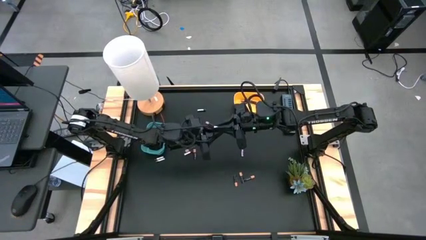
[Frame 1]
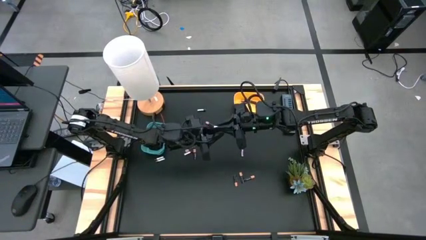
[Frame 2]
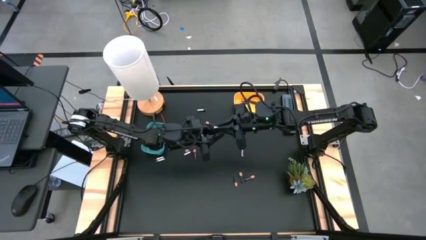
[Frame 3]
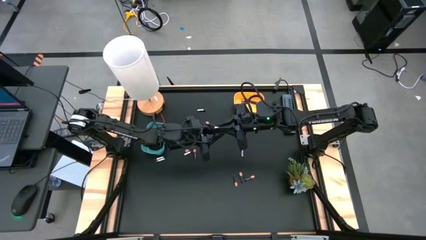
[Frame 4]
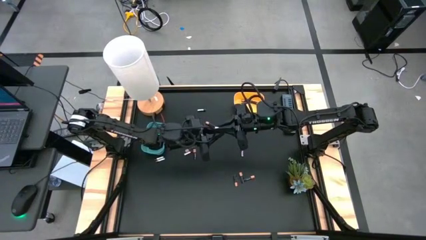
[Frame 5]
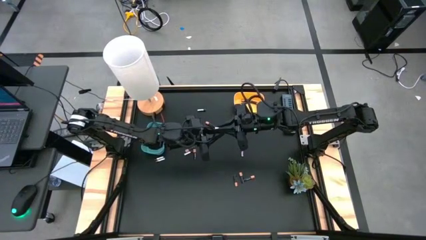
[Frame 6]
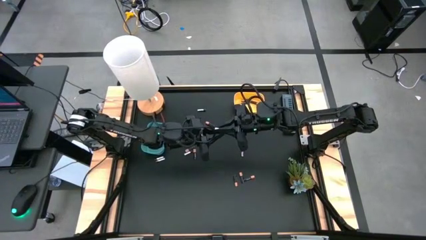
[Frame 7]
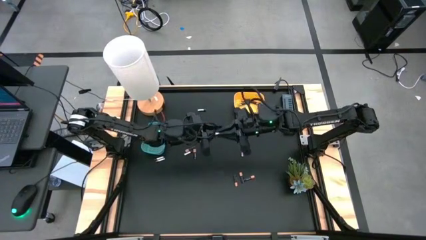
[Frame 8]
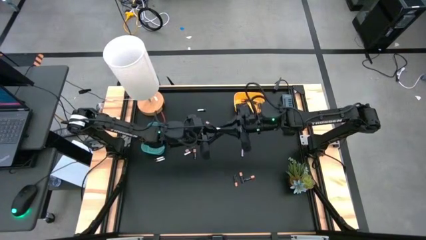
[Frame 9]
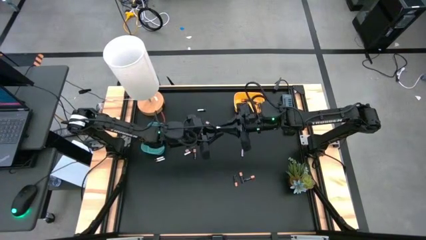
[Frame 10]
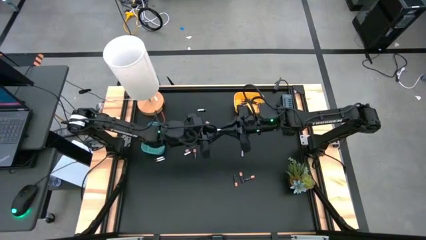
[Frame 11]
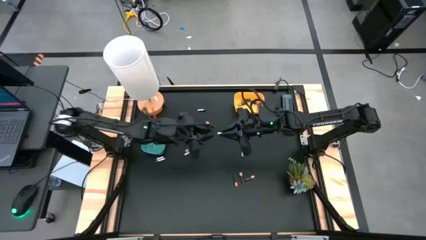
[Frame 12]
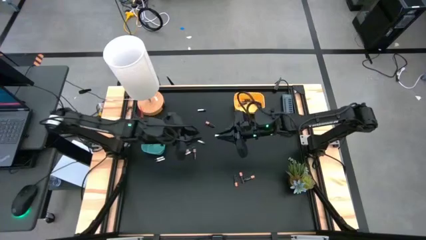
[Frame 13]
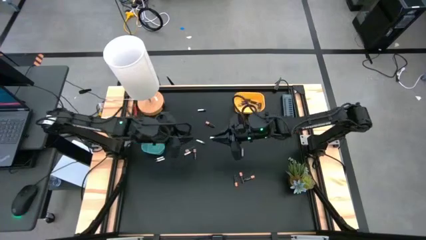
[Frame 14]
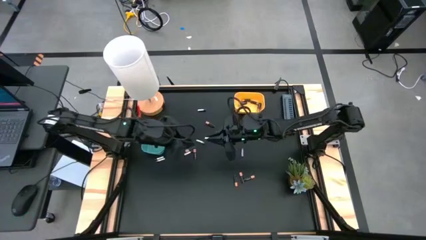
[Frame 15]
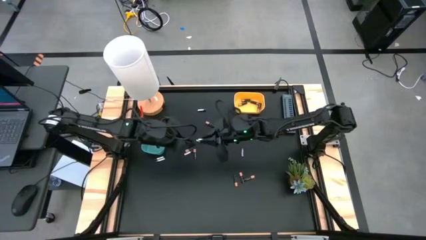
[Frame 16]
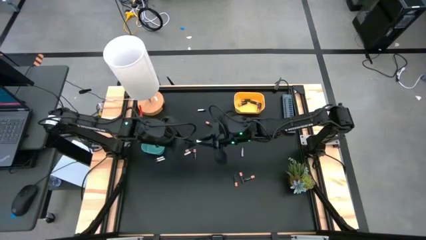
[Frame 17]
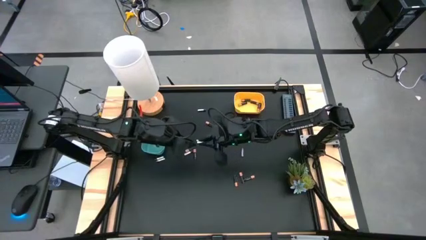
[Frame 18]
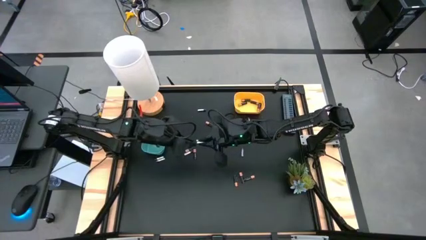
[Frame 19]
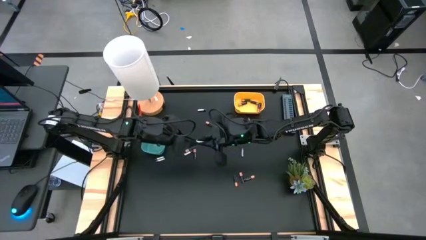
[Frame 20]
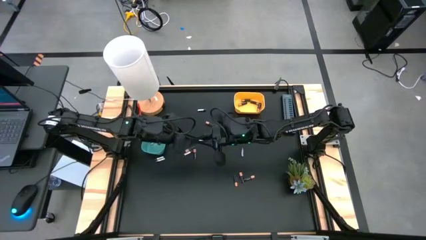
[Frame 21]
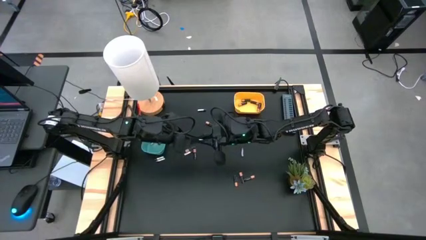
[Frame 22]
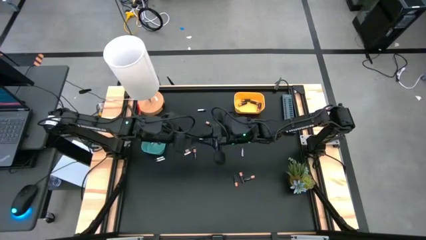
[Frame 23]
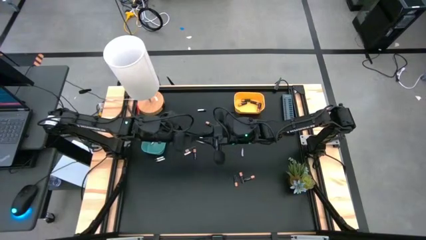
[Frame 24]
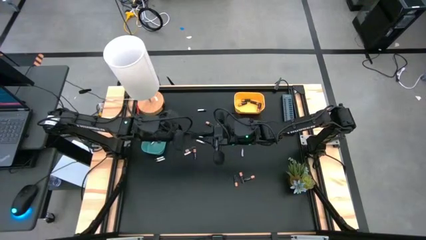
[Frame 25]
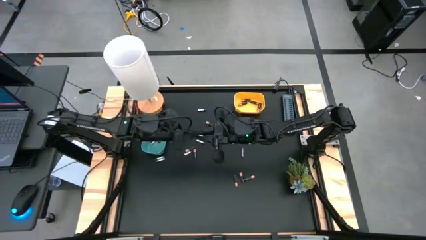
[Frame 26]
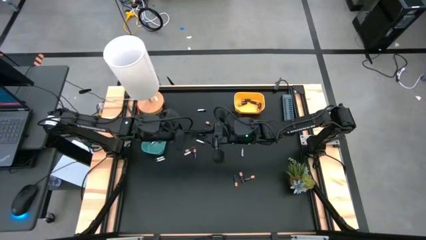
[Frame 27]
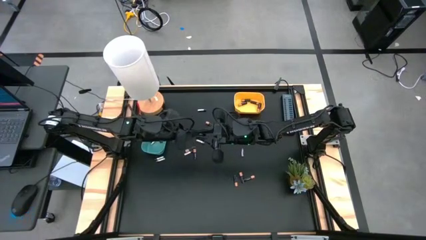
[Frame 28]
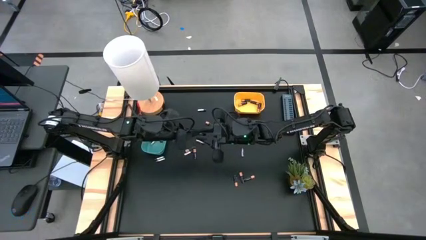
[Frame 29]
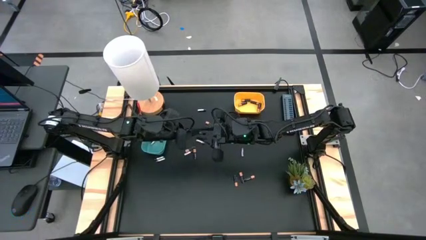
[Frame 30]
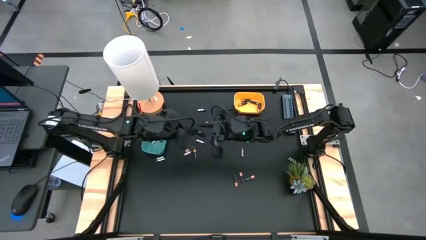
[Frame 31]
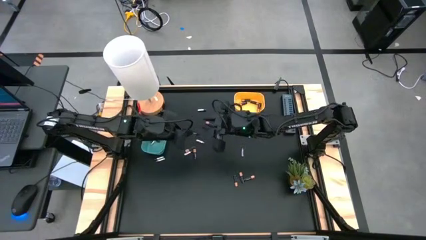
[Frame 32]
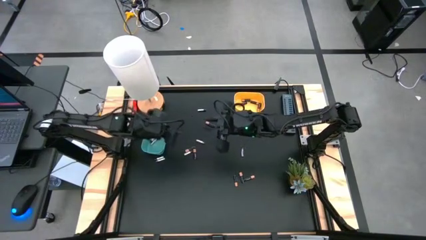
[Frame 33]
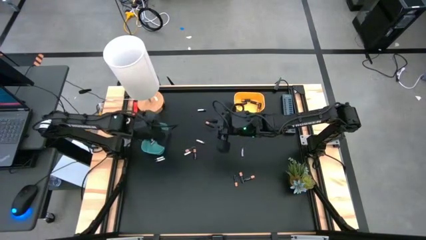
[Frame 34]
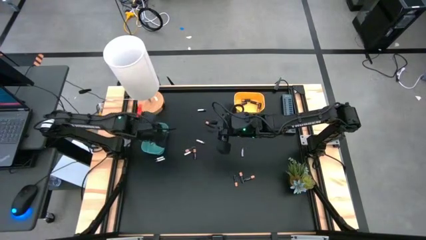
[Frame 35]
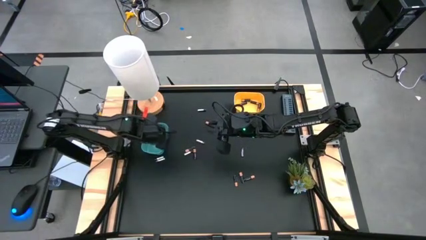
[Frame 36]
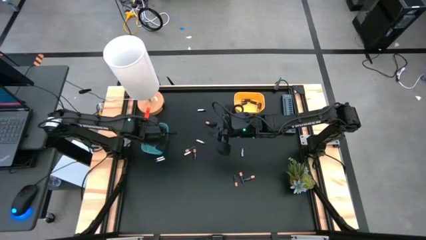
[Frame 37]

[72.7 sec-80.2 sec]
Task: Sort batteries
Put the silver battery into the green bin

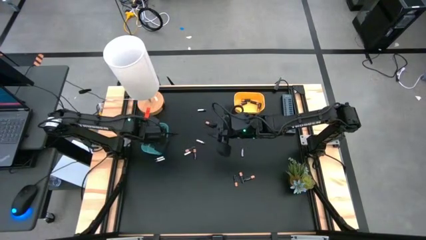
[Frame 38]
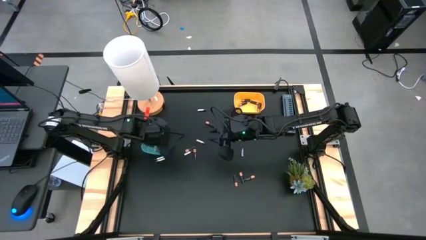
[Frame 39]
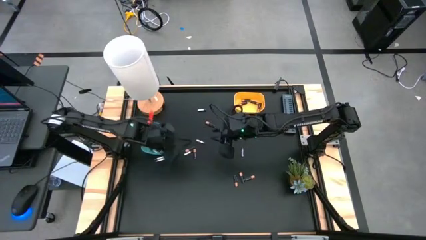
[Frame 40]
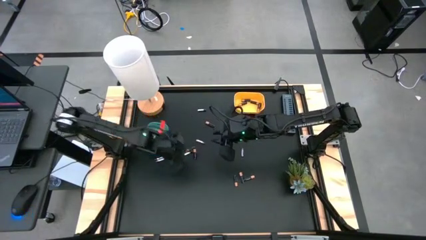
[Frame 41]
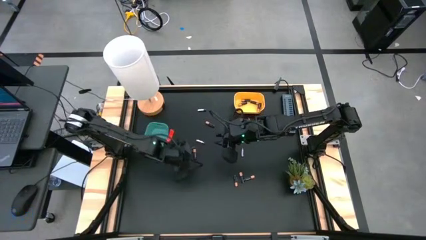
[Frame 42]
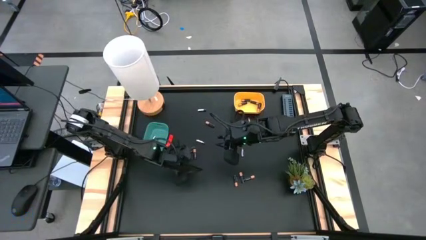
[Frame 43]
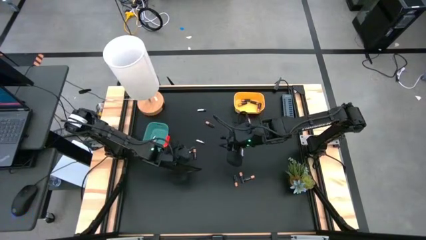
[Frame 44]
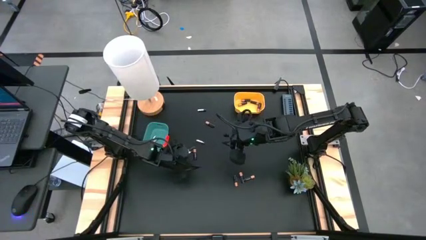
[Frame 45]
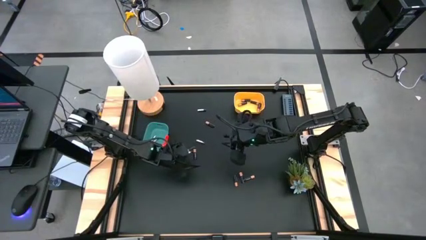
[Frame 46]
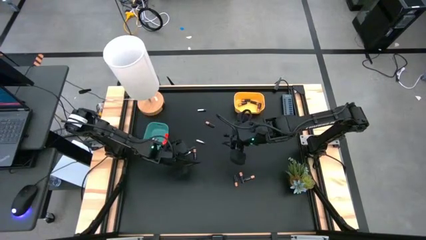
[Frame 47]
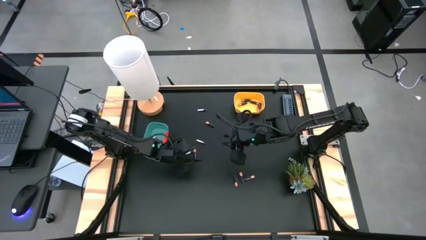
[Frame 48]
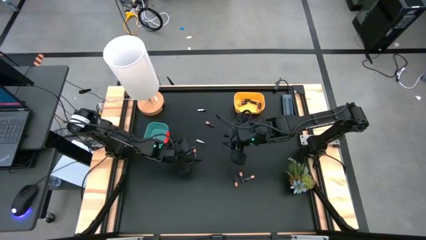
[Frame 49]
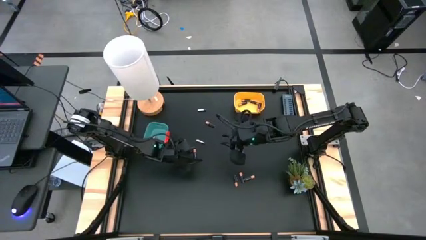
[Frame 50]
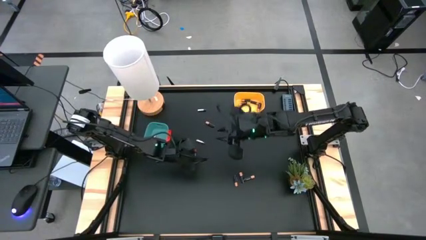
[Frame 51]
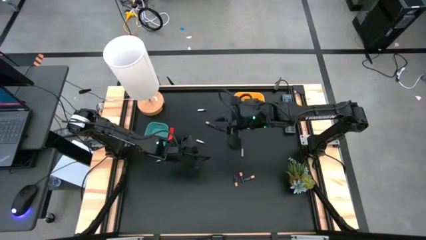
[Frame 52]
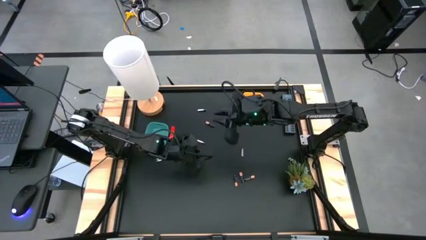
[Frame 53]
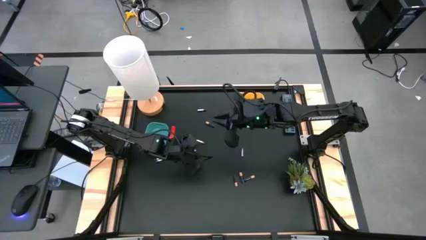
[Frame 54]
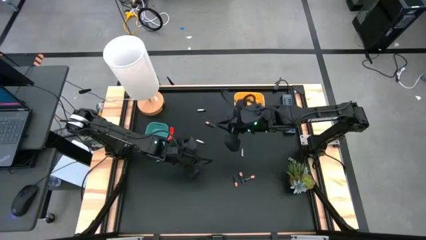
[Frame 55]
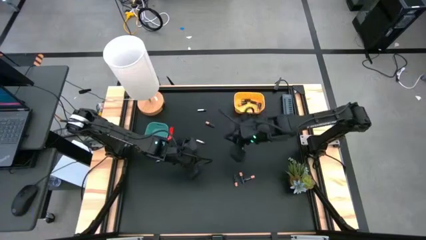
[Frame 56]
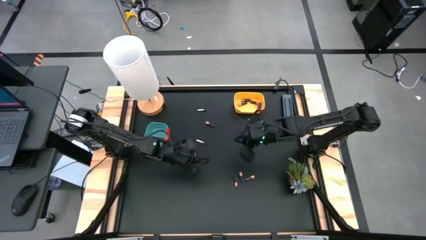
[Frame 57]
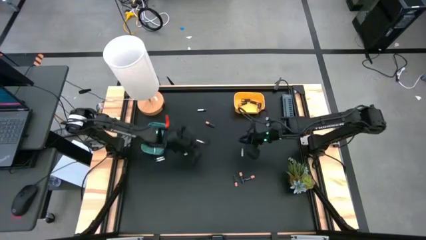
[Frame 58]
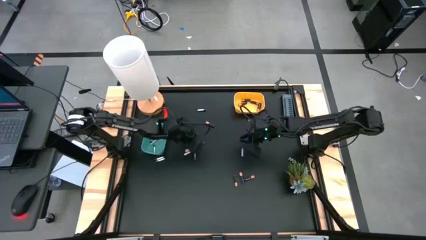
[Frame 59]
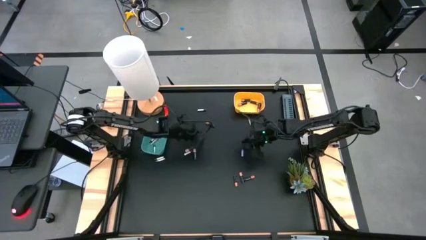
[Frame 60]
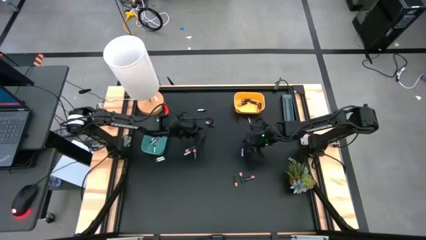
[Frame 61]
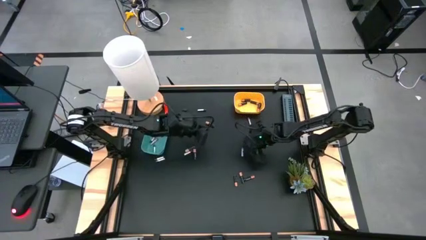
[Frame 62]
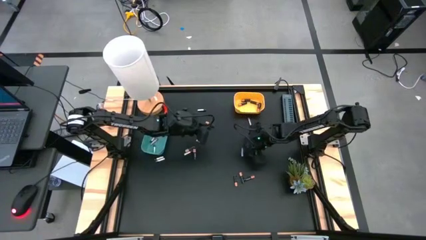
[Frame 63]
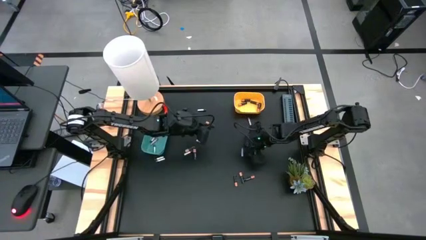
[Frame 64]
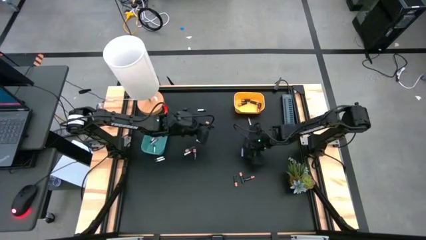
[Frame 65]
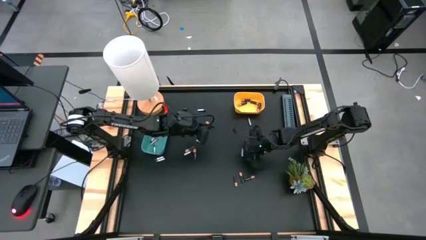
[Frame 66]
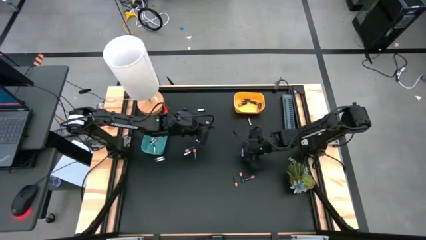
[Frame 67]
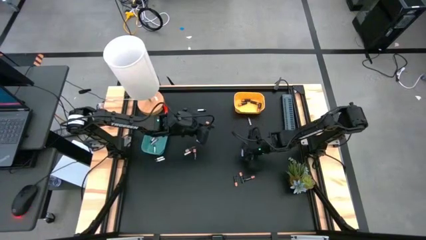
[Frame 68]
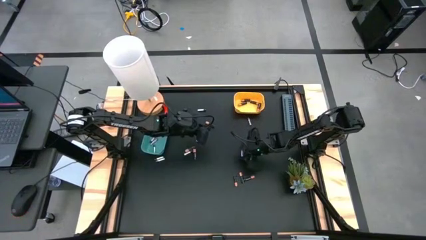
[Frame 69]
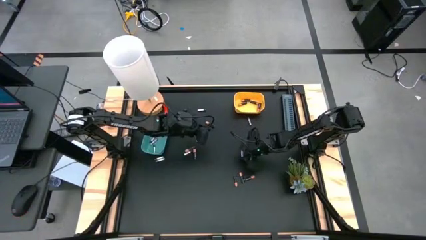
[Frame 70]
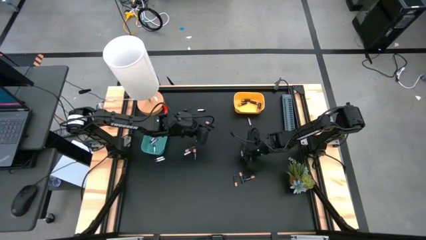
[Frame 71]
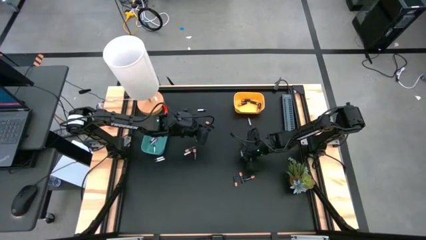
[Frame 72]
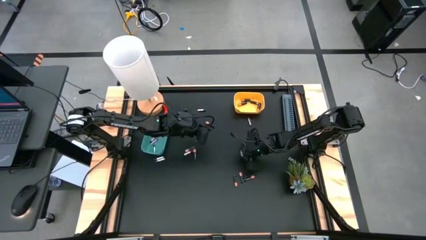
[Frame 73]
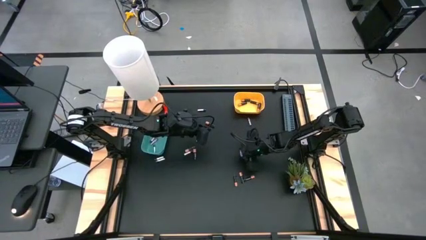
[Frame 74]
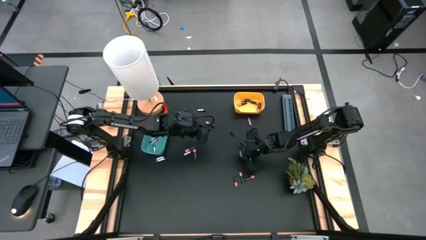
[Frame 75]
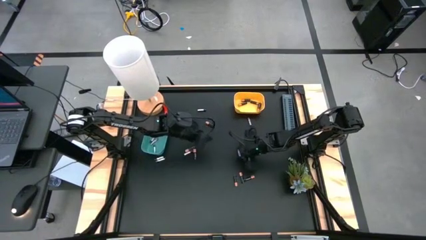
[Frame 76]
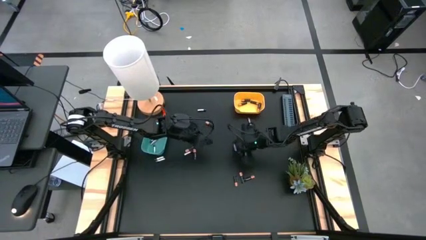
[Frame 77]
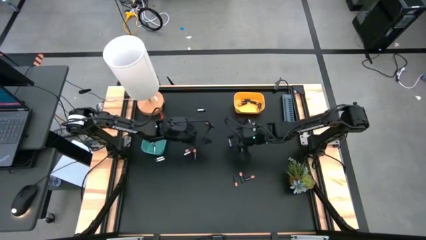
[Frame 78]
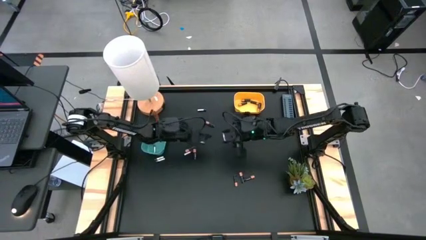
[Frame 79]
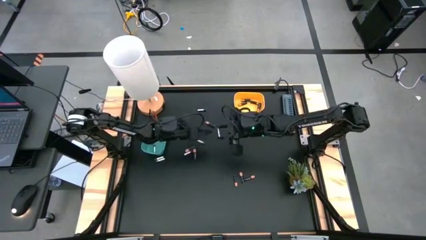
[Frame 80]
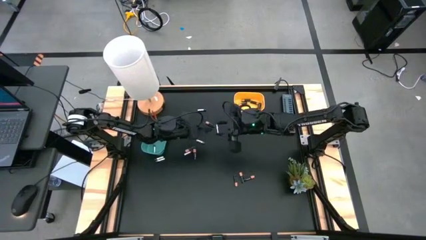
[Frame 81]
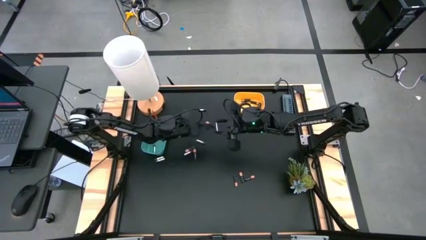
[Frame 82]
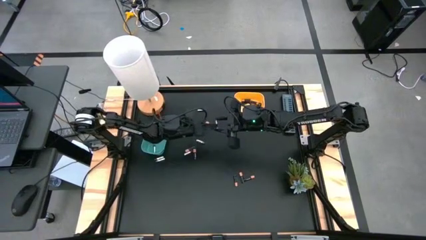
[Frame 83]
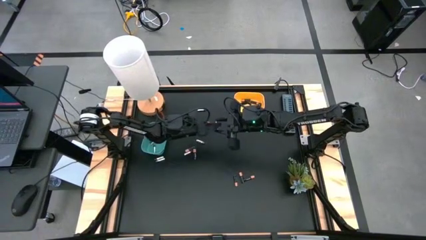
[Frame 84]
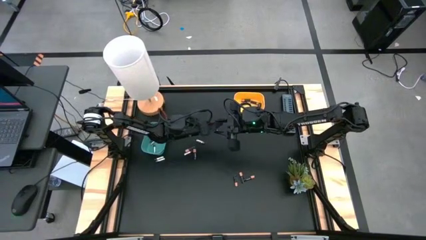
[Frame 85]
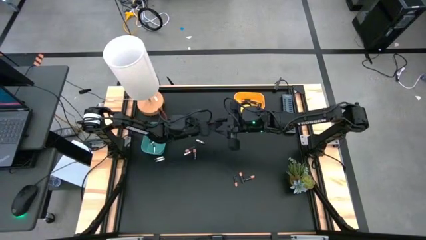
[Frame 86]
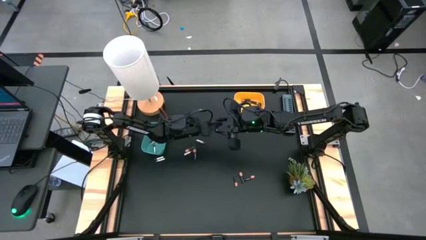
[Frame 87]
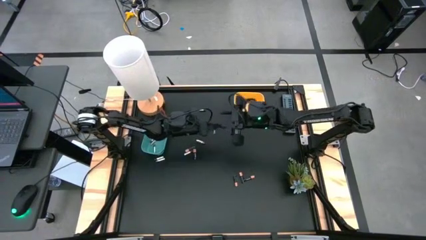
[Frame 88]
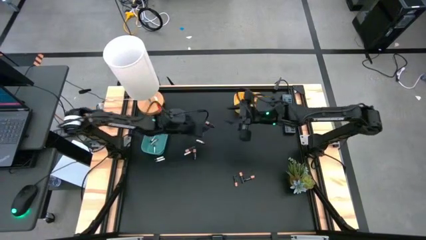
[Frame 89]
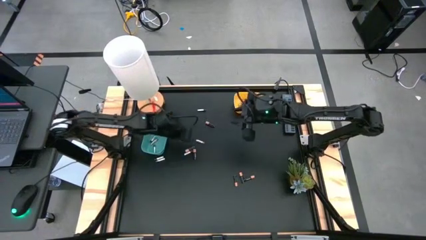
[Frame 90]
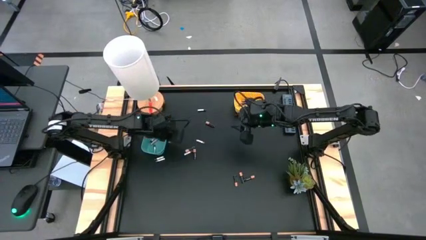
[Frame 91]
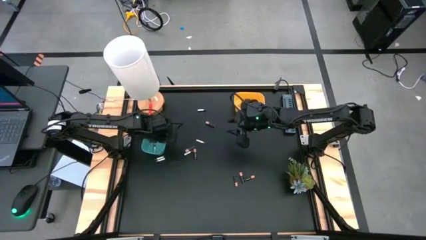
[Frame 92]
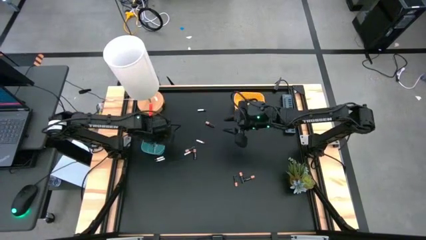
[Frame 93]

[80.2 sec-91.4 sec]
Put the silver battery into the green bin
